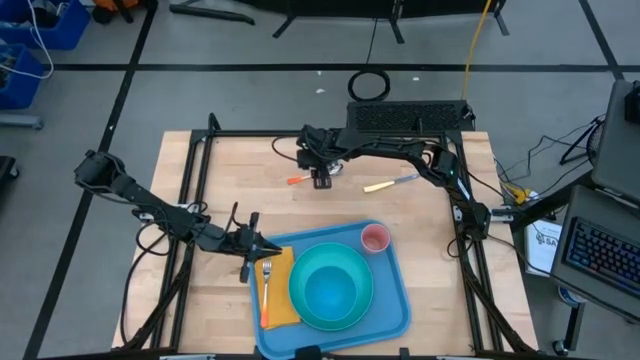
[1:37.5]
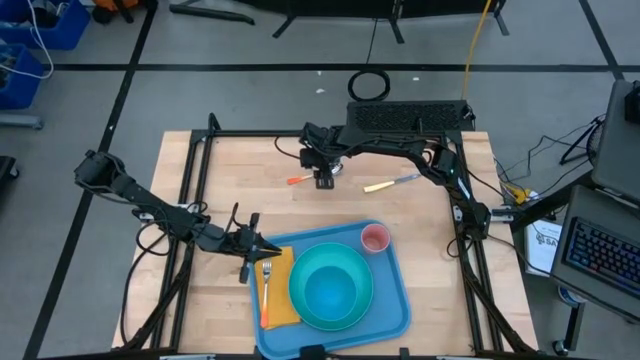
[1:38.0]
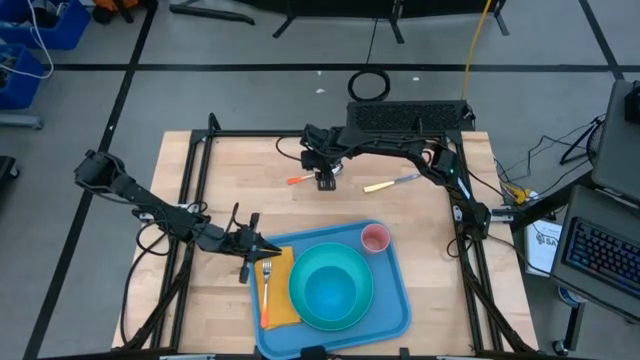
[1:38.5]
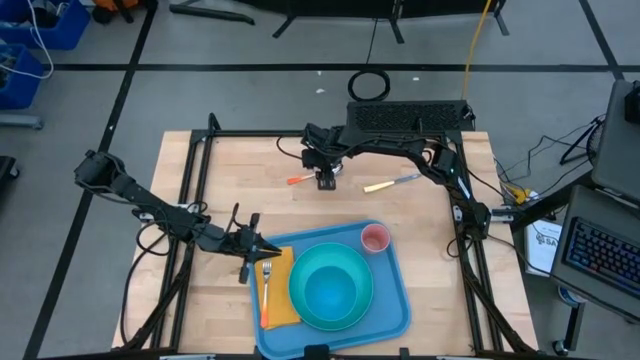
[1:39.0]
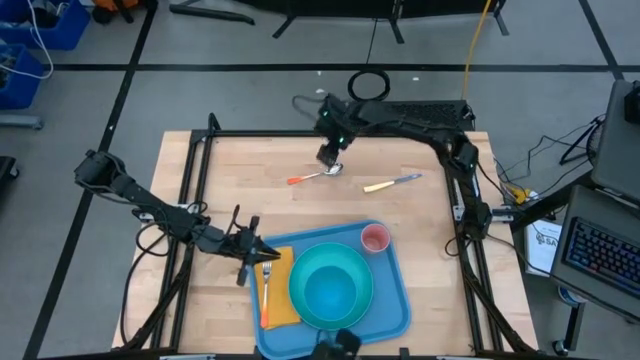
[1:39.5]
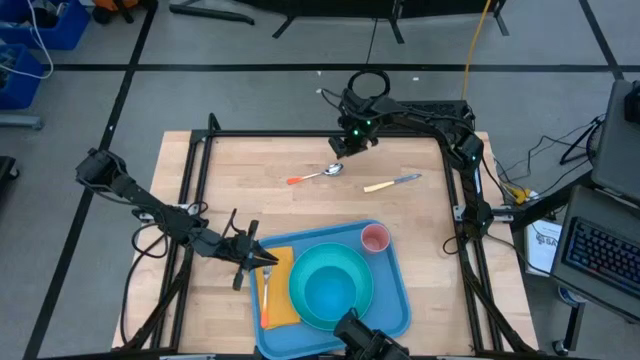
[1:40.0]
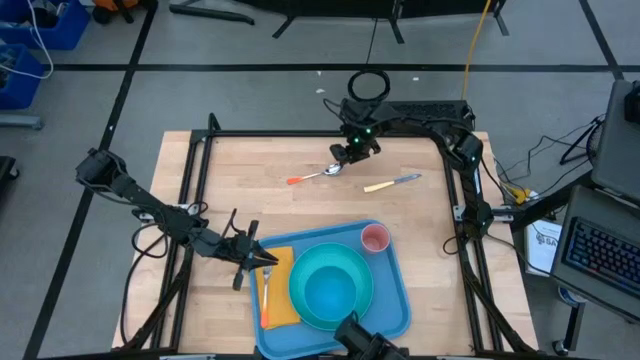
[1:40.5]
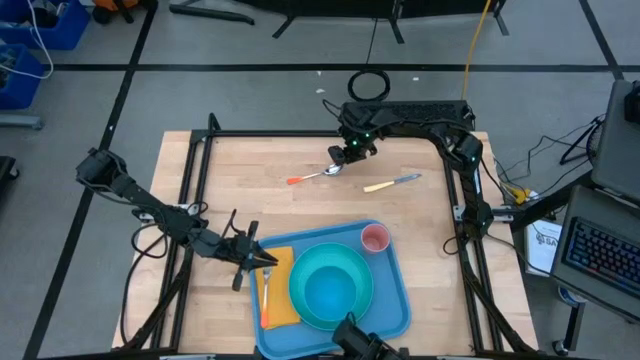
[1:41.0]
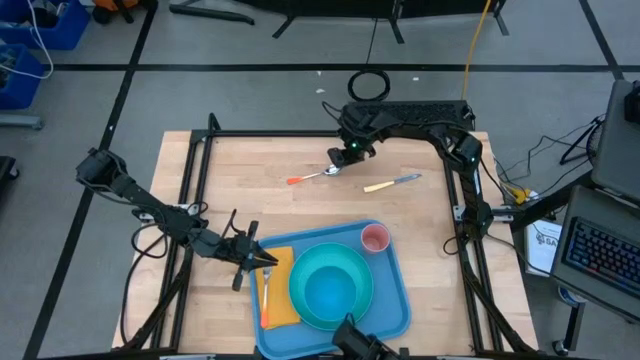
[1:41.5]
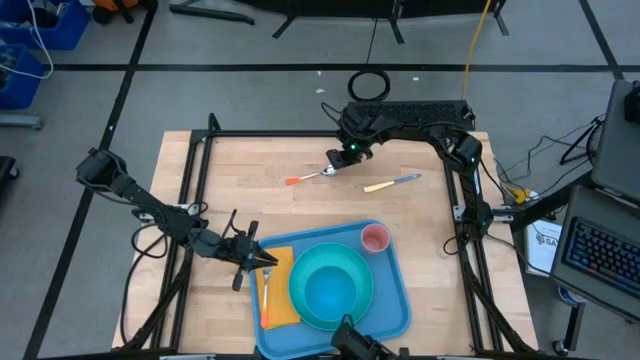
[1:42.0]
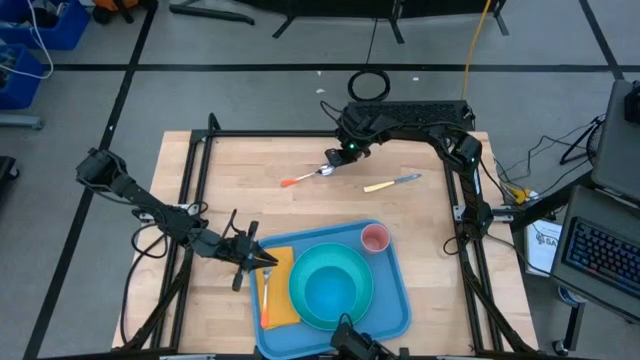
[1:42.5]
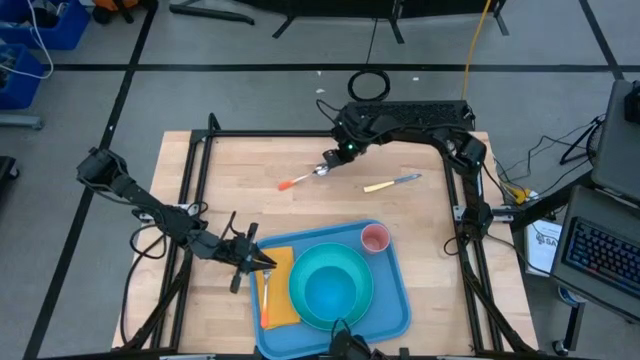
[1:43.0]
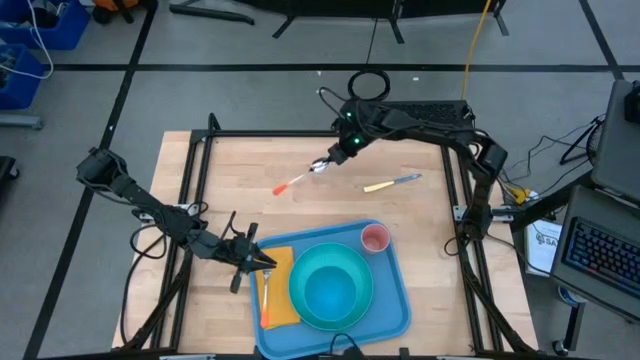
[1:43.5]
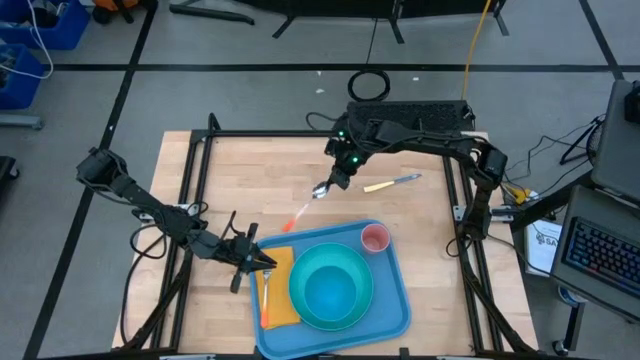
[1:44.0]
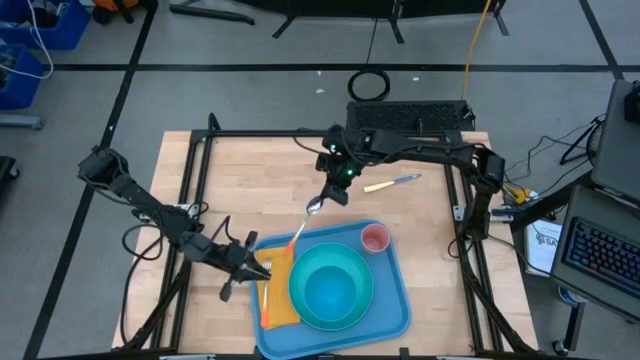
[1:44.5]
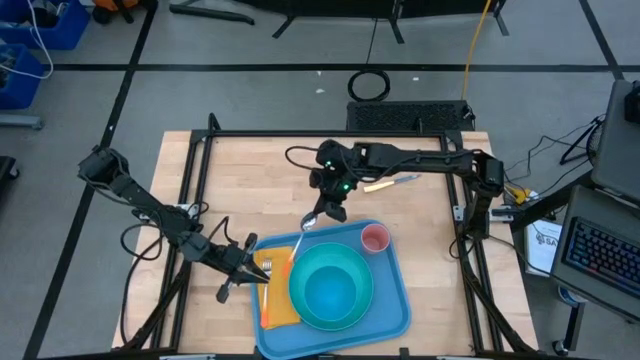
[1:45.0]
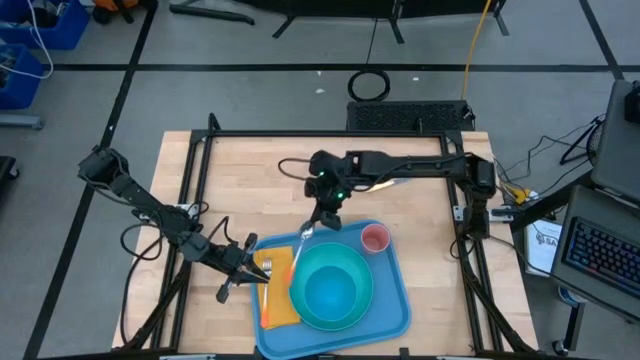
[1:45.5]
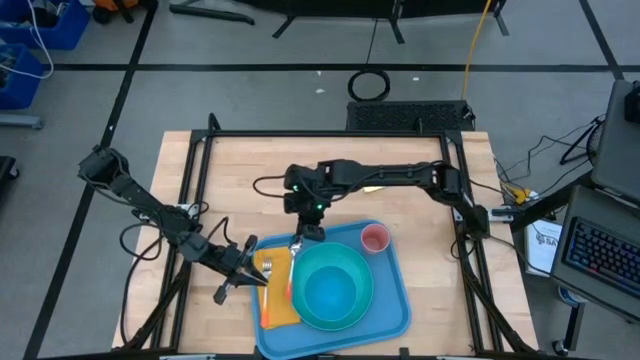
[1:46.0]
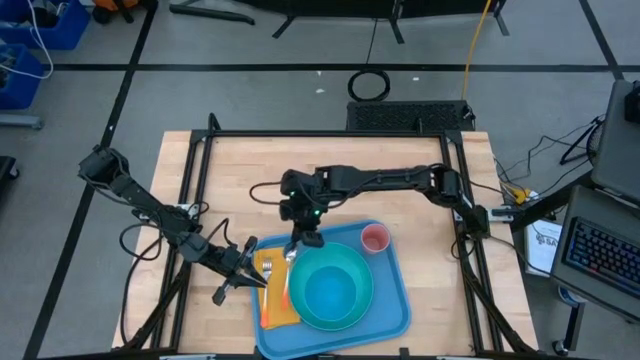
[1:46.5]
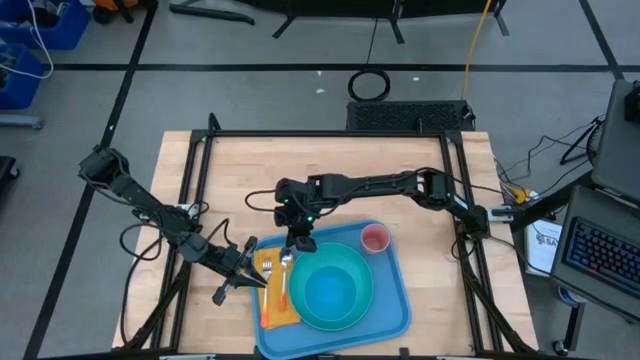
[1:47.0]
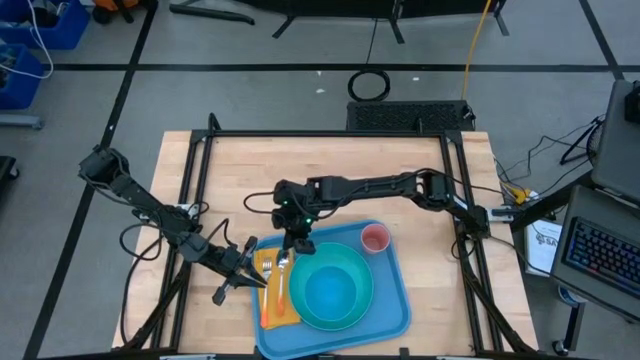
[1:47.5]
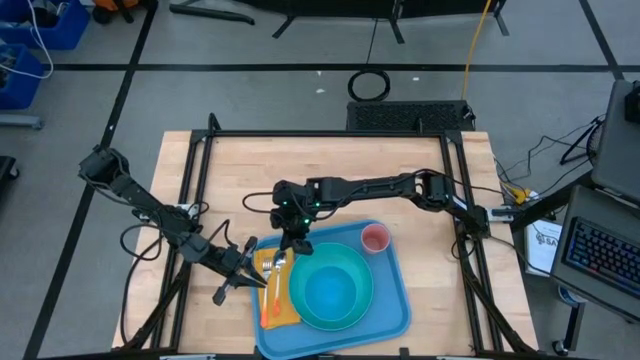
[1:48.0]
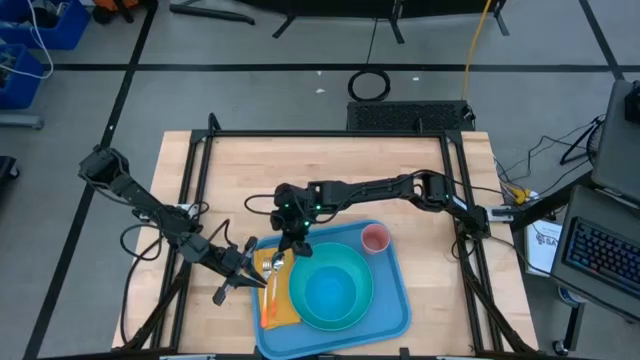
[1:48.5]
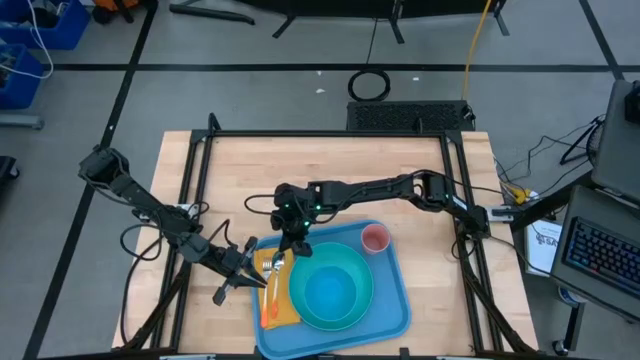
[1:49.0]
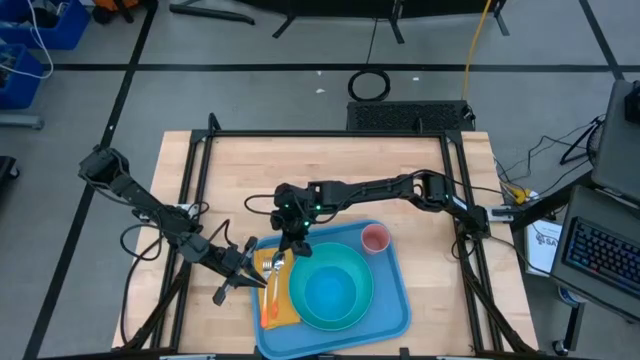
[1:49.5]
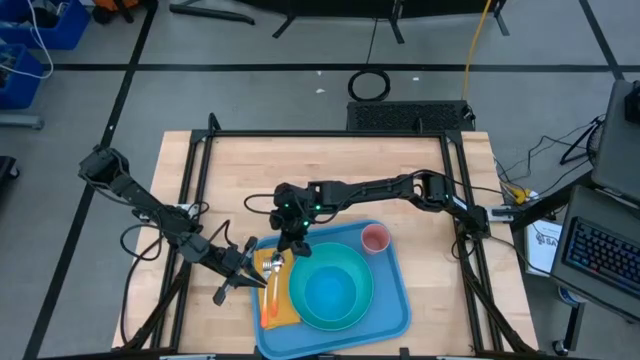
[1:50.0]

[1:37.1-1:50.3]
Task: Set up tray
Put the spoon on top of the napkin to the right of the fork

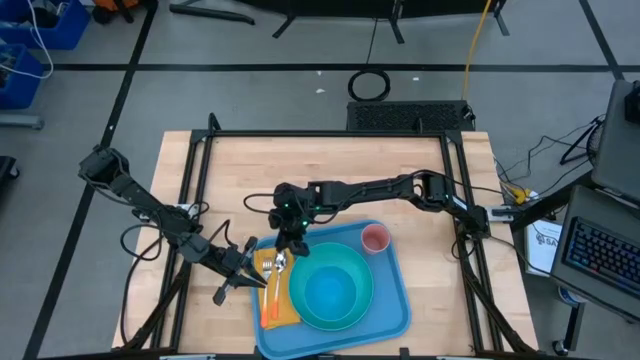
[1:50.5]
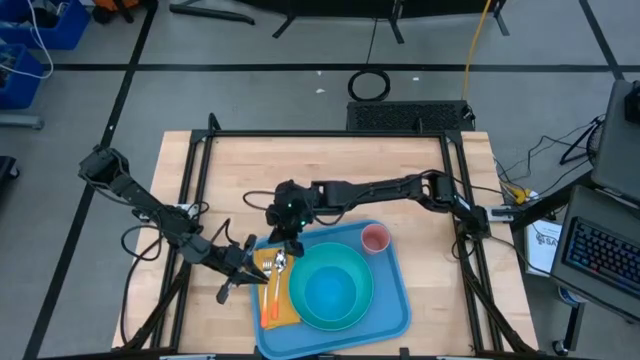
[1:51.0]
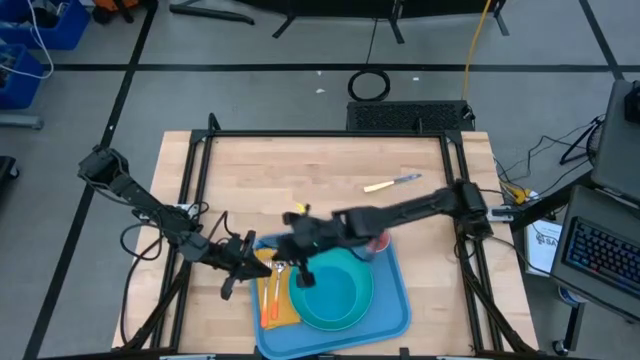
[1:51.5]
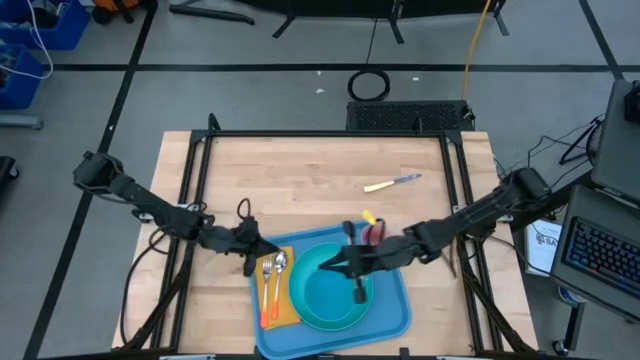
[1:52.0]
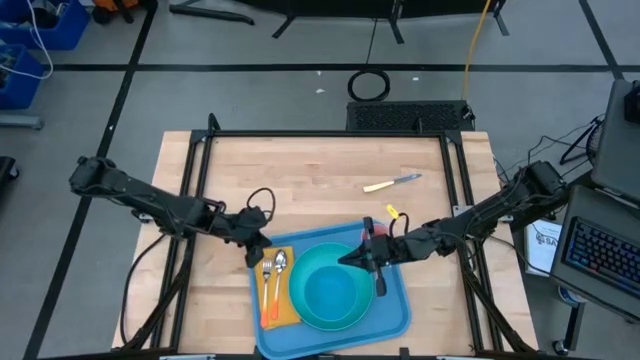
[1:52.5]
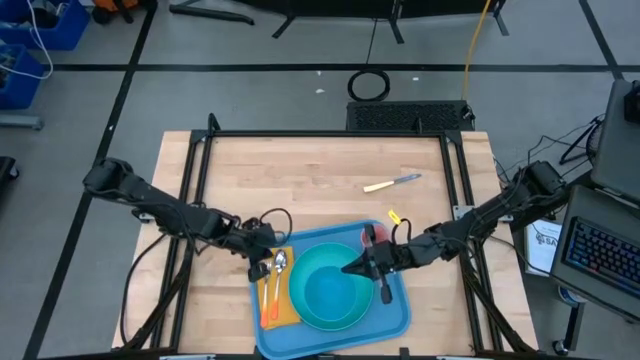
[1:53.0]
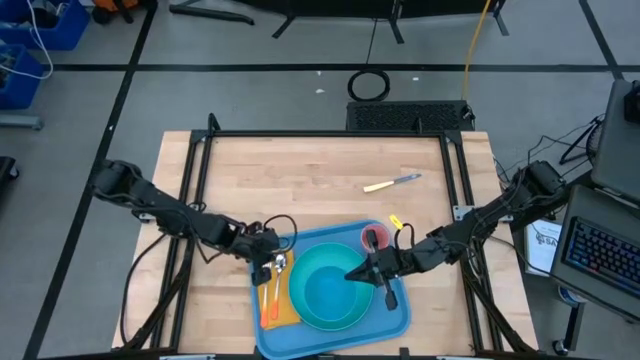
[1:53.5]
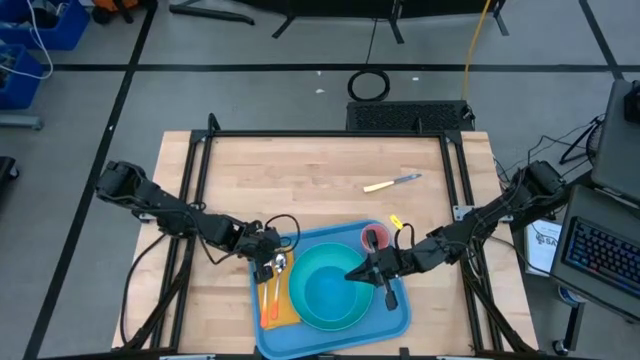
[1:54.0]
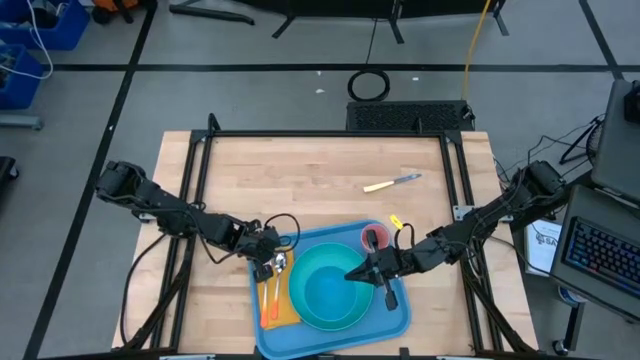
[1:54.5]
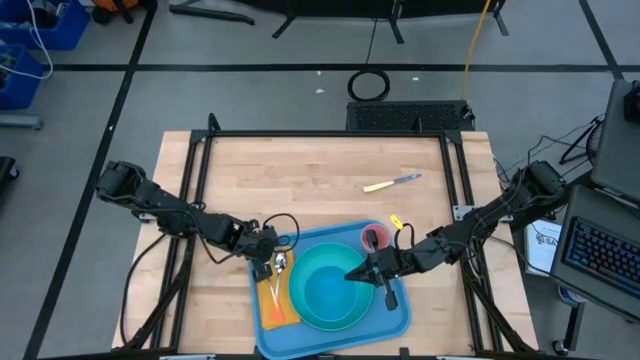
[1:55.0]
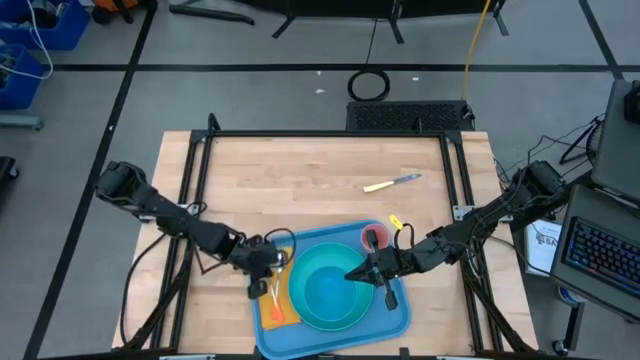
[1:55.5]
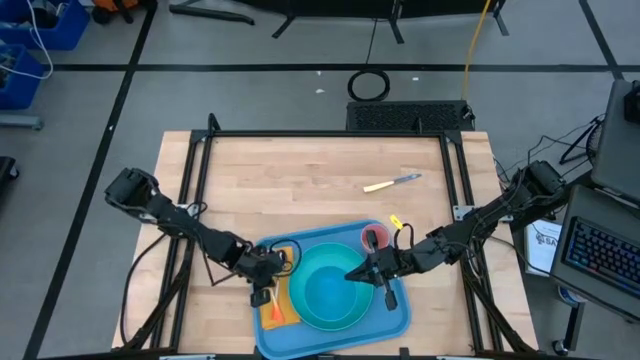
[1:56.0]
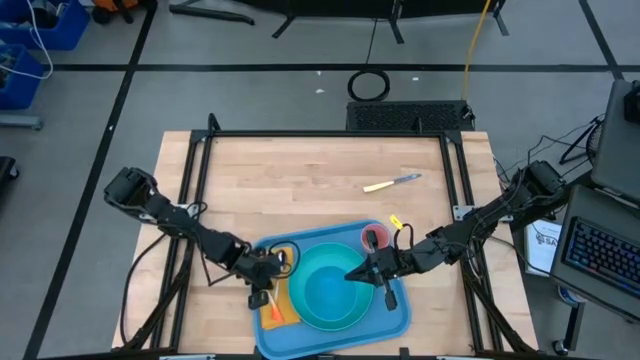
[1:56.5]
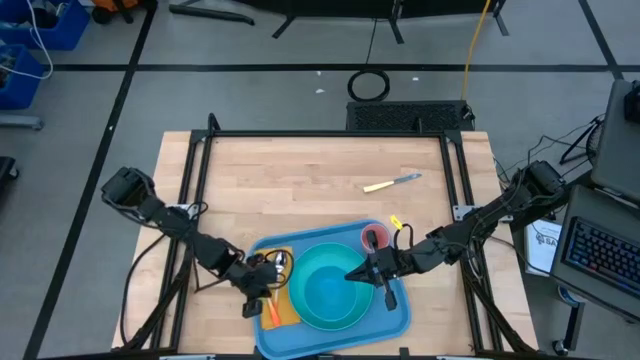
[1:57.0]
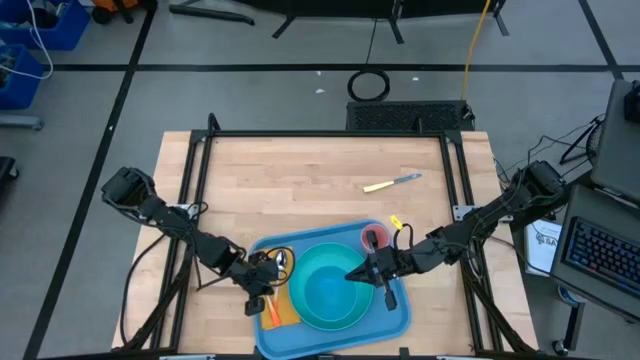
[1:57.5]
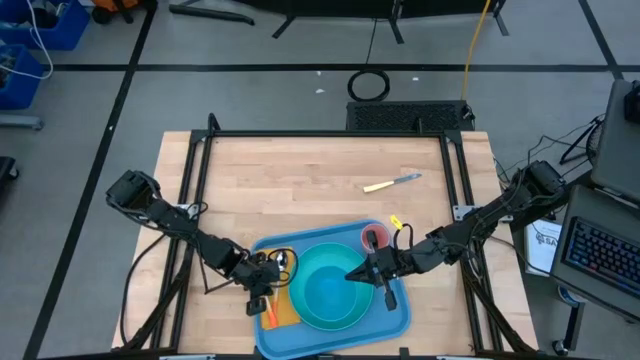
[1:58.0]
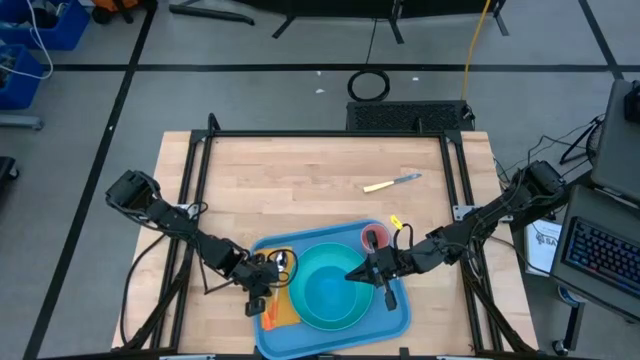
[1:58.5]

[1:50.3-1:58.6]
Adjust the fork on the napkin

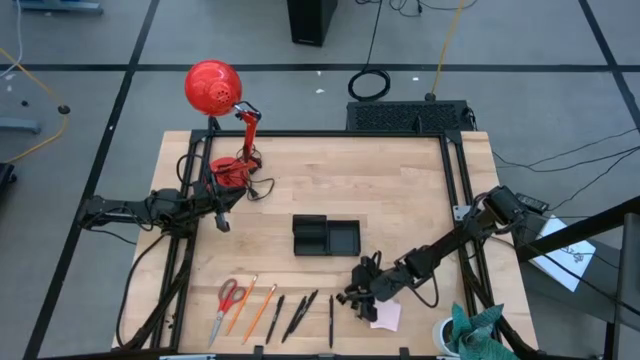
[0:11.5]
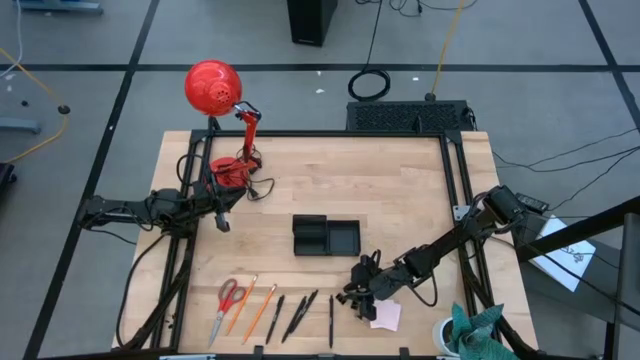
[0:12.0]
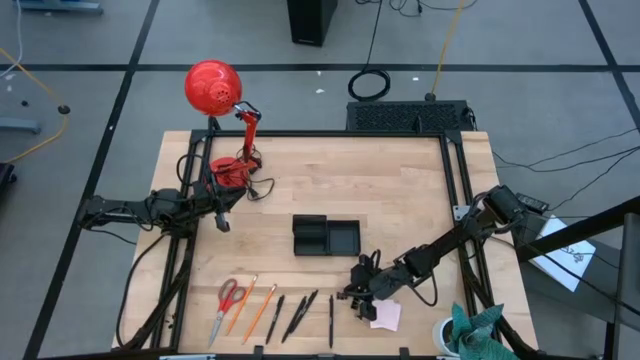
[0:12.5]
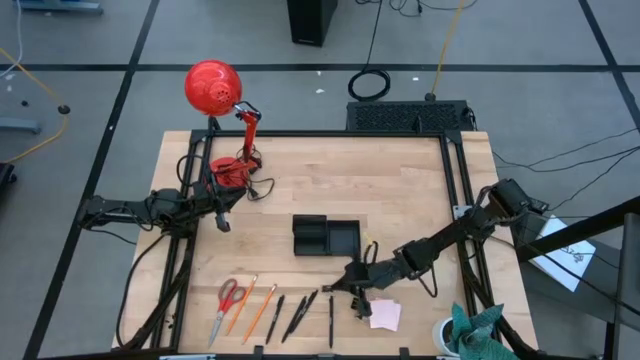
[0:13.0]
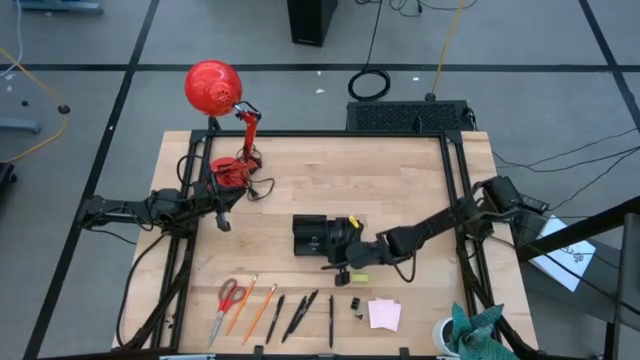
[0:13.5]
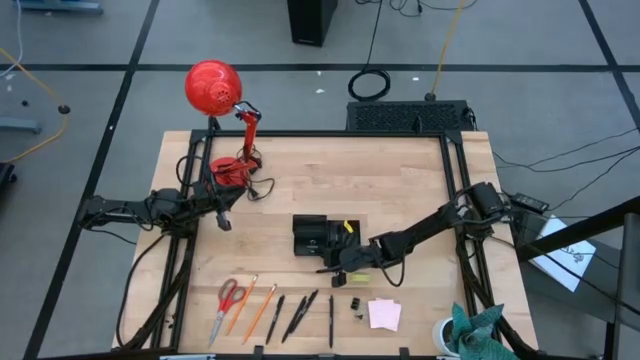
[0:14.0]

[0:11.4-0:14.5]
Task: Pick and place office supplies into organizer
Put the top binder clip into the desk organizer
